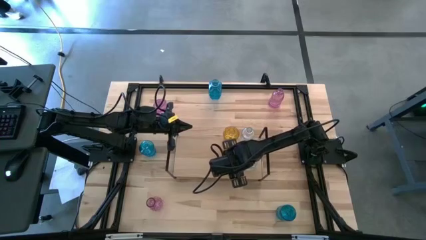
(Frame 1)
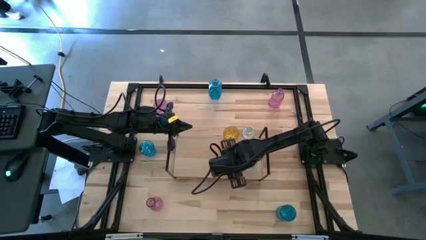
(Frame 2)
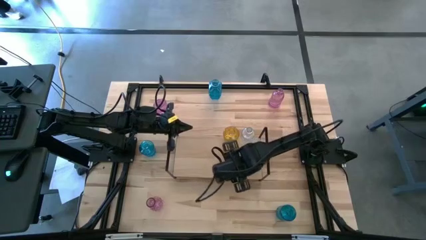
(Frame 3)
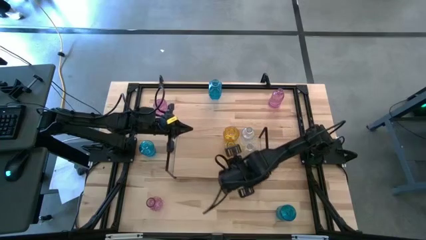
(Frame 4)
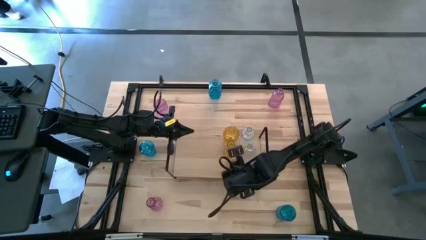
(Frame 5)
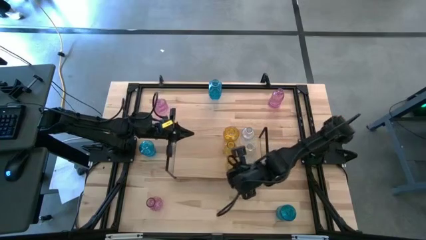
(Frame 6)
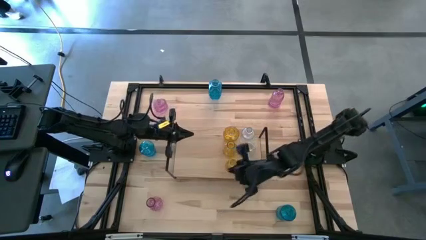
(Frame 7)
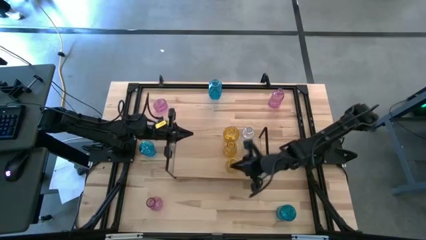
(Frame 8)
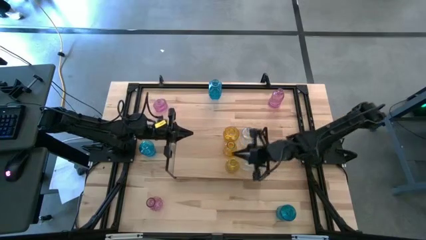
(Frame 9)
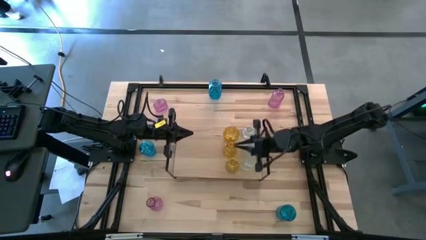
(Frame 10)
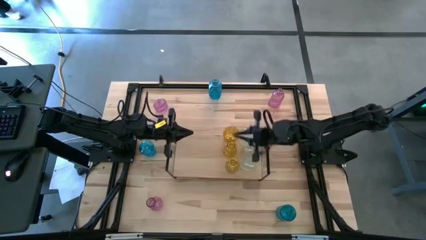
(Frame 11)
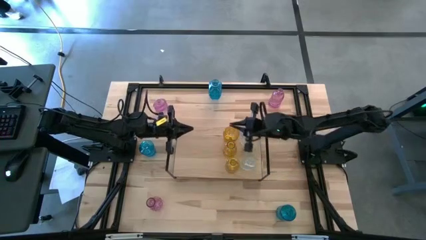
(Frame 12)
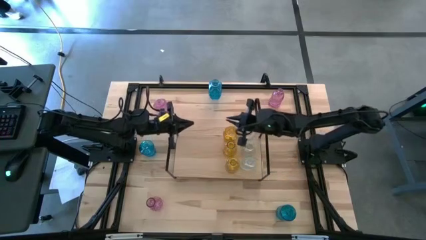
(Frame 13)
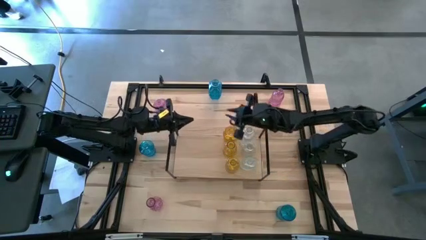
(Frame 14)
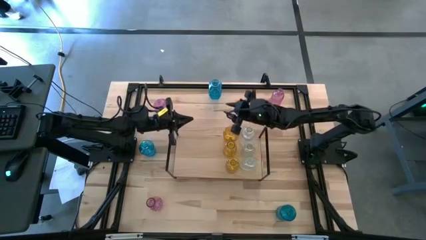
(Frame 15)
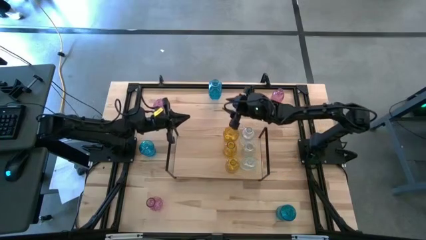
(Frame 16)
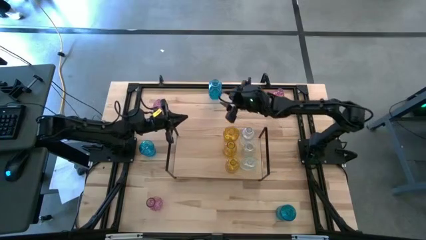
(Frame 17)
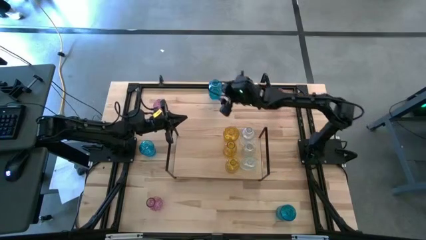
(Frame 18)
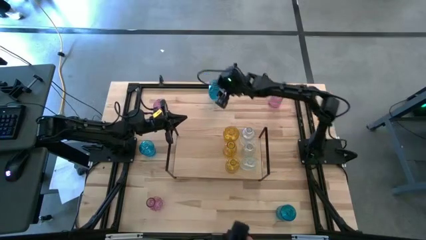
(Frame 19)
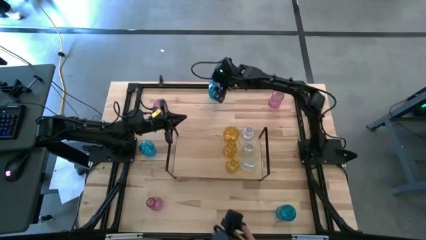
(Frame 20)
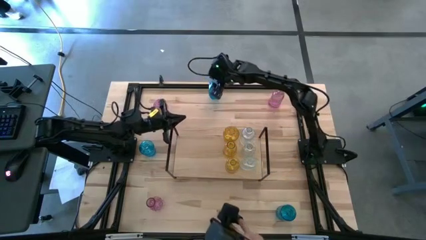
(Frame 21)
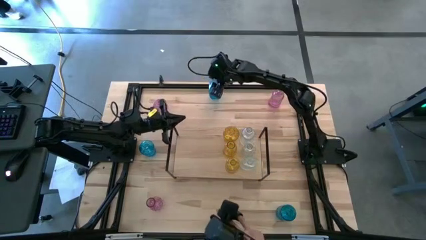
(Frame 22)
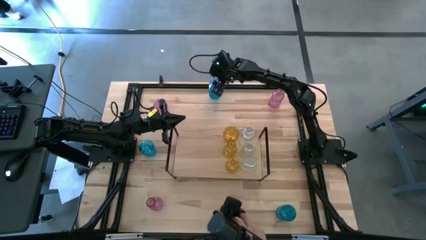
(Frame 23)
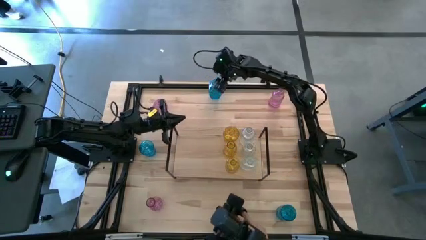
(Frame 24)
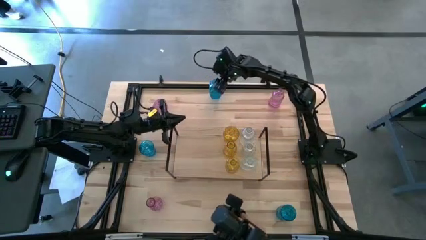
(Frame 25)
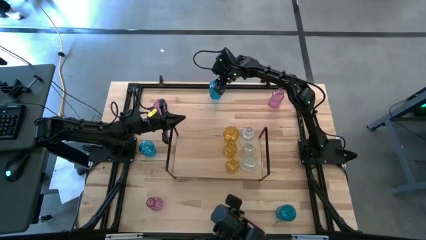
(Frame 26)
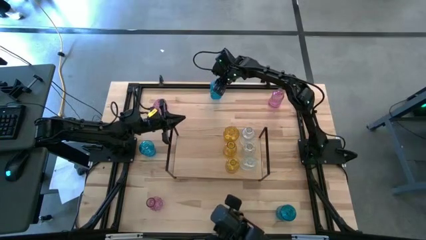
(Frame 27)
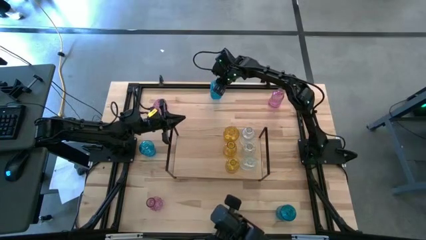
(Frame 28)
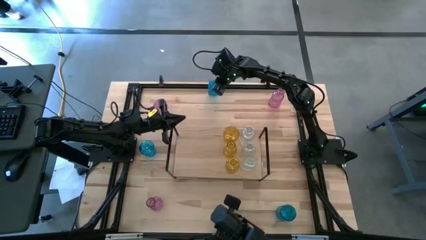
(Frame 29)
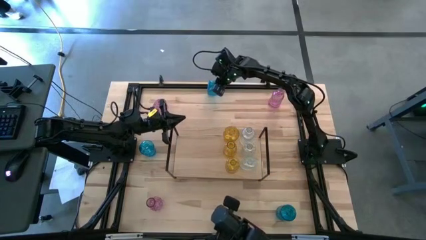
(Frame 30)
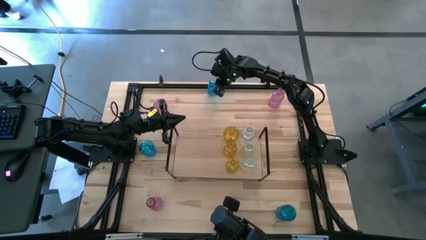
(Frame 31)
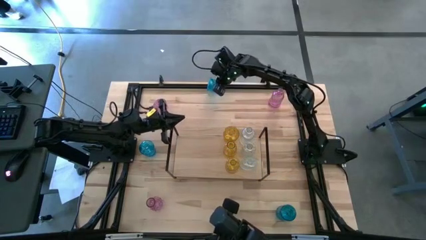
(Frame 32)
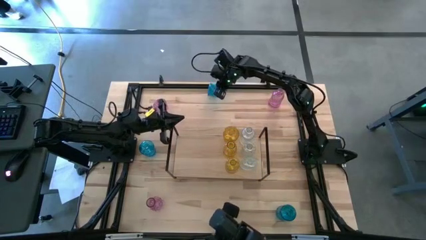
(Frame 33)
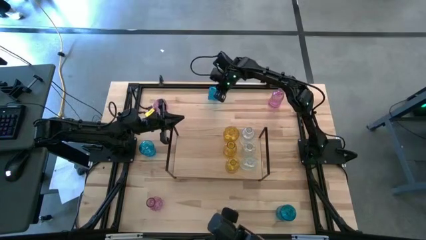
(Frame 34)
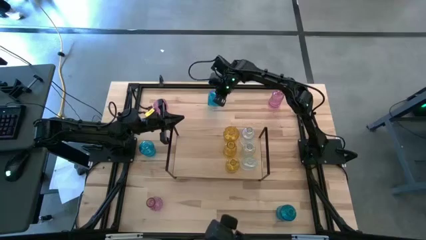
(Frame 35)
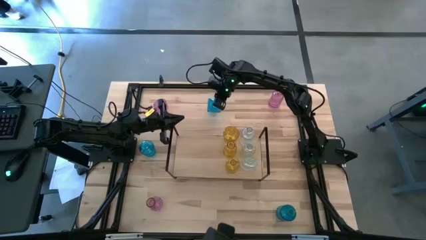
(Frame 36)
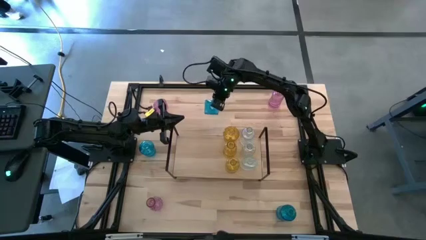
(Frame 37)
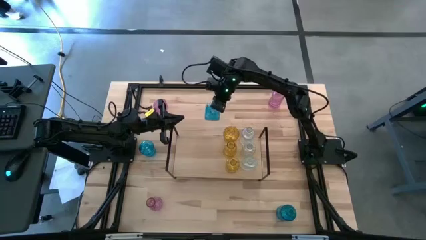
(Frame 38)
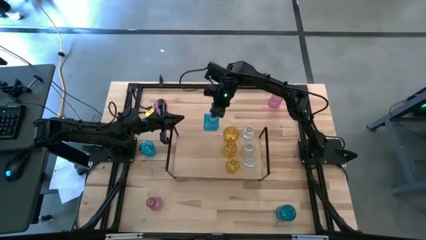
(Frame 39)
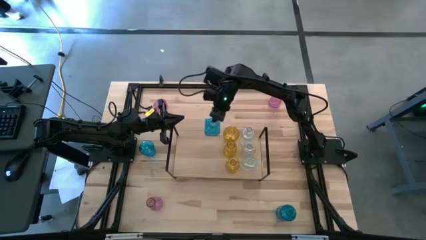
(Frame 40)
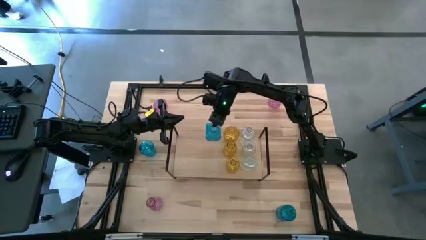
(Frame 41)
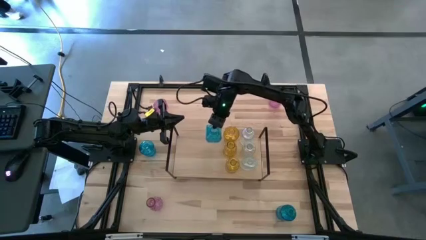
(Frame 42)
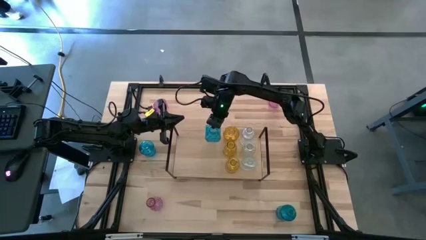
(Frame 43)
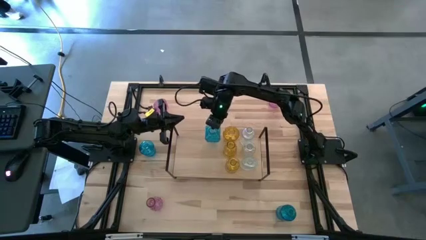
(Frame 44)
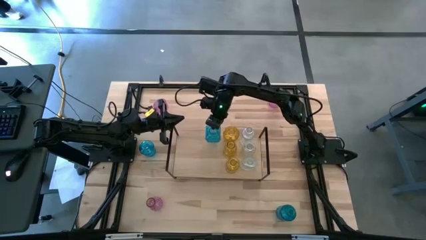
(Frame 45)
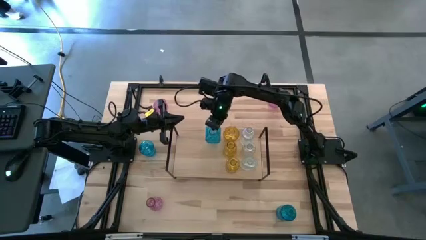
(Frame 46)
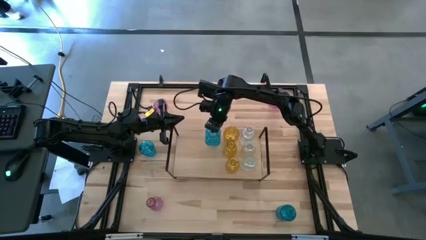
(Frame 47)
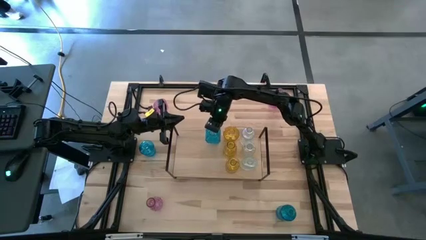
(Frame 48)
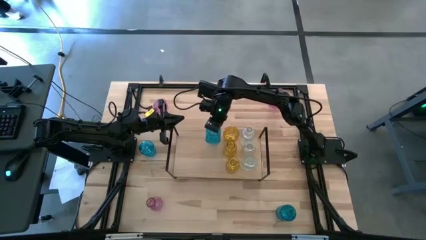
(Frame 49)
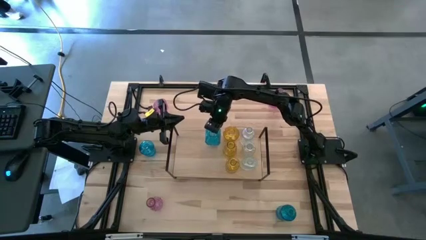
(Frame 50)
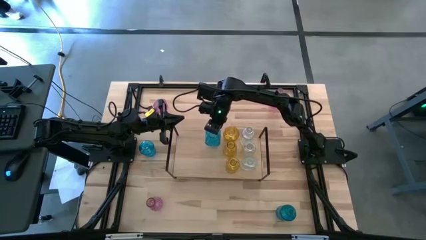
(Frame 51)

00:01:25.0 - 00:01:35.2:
Task: sort vases onto shelf
Put the top blue vase on the shelf
